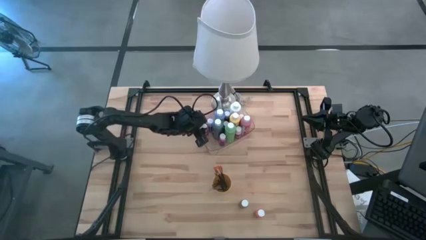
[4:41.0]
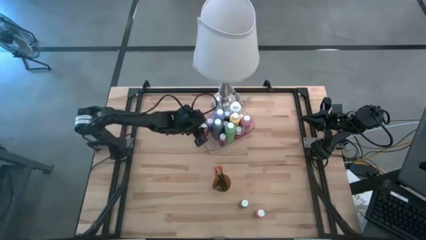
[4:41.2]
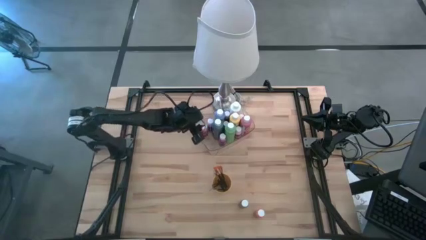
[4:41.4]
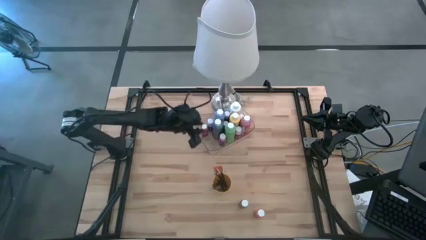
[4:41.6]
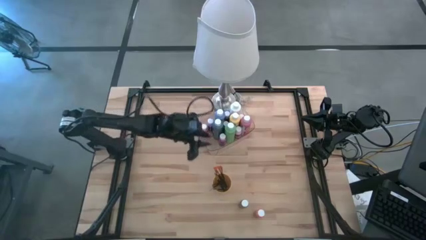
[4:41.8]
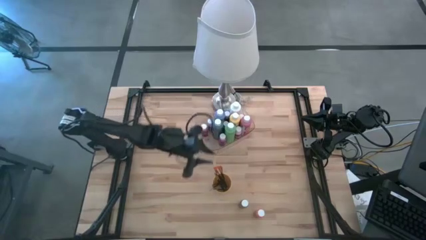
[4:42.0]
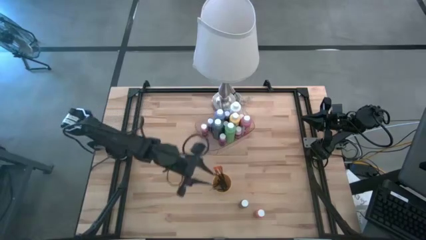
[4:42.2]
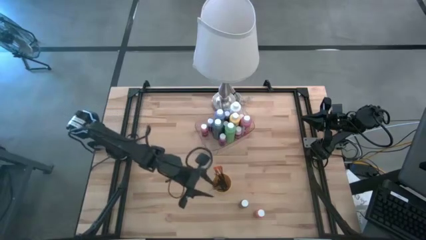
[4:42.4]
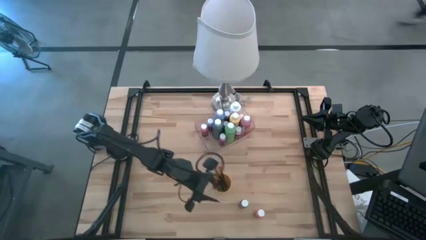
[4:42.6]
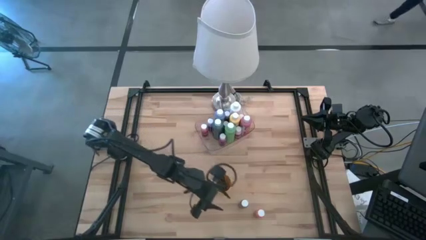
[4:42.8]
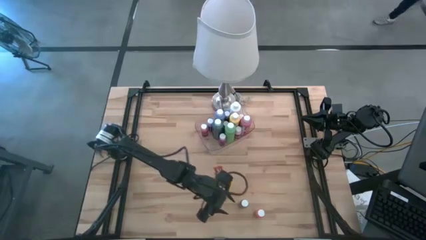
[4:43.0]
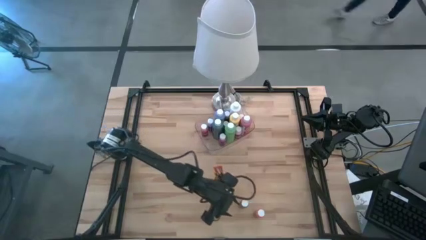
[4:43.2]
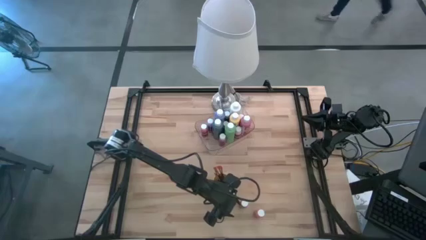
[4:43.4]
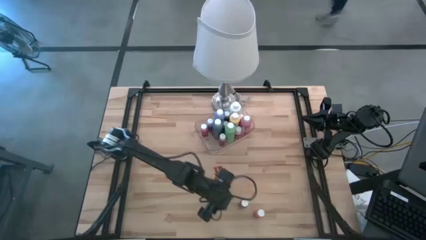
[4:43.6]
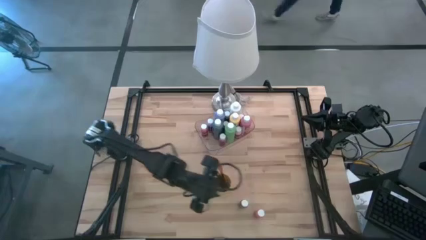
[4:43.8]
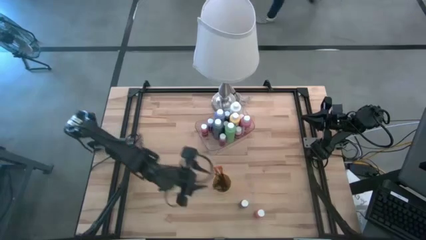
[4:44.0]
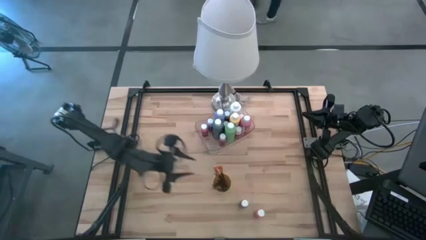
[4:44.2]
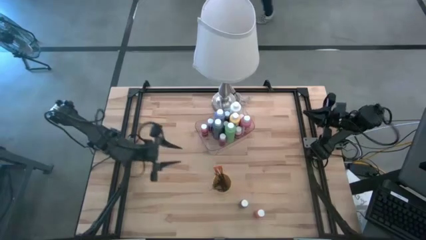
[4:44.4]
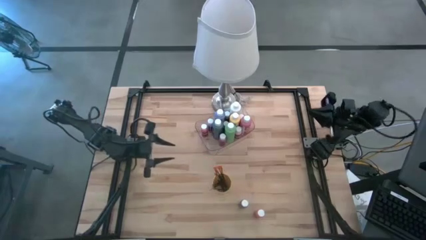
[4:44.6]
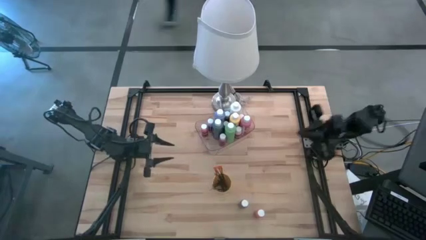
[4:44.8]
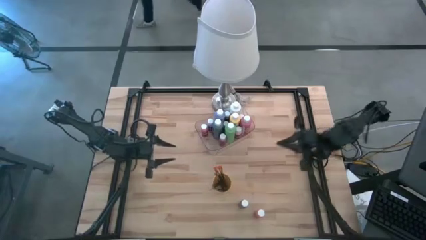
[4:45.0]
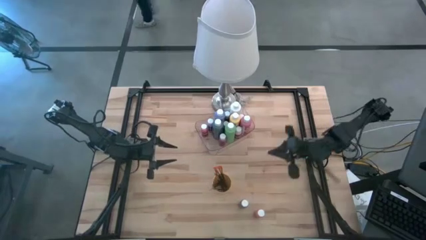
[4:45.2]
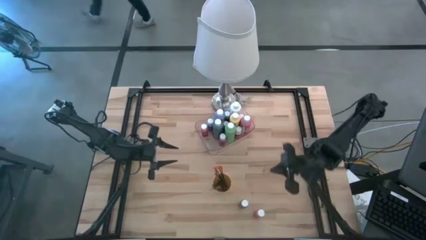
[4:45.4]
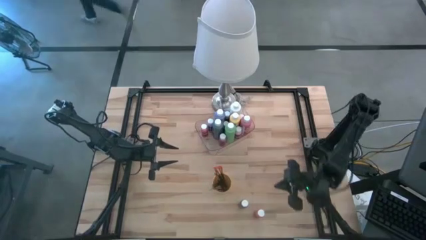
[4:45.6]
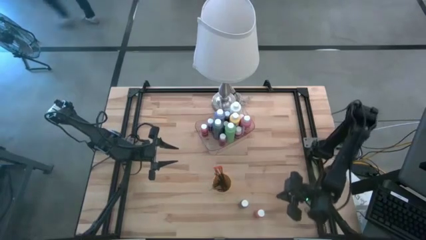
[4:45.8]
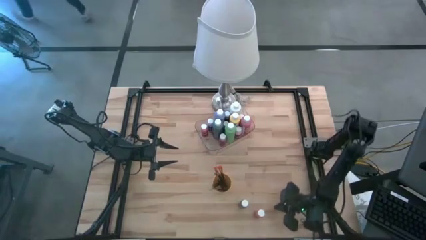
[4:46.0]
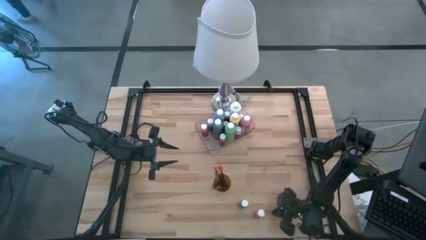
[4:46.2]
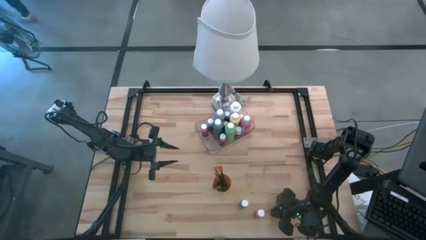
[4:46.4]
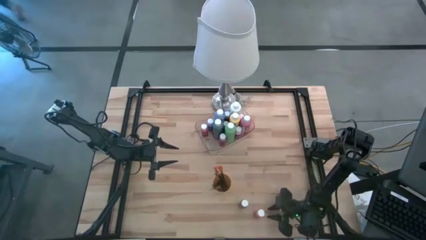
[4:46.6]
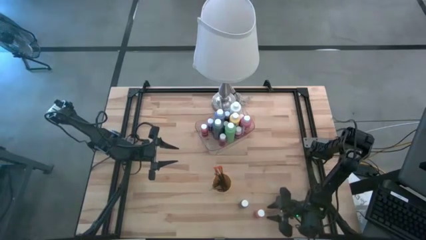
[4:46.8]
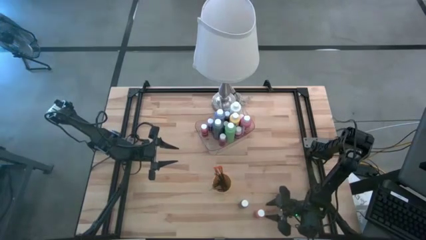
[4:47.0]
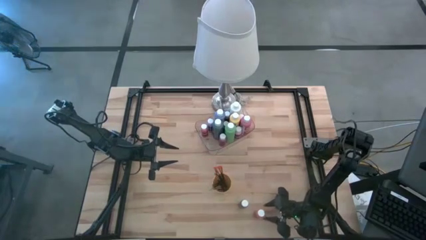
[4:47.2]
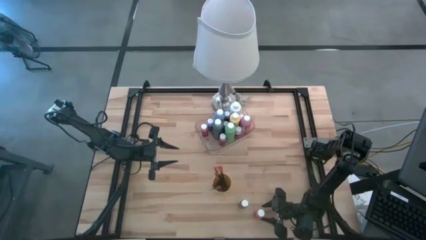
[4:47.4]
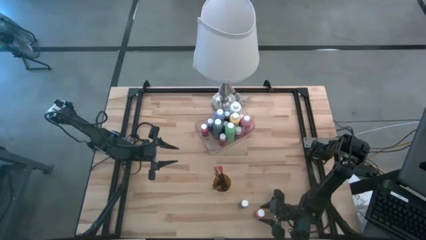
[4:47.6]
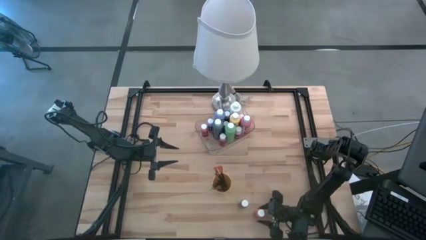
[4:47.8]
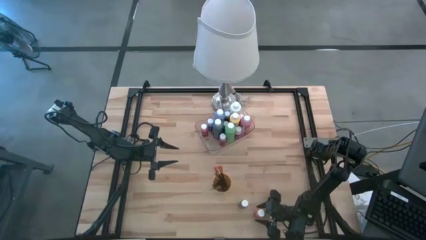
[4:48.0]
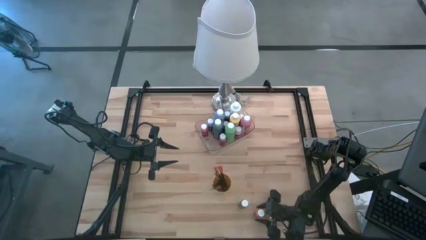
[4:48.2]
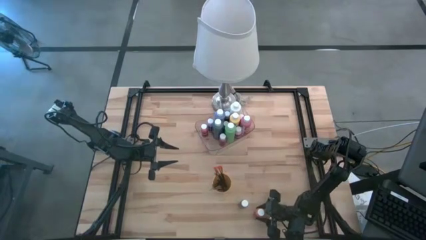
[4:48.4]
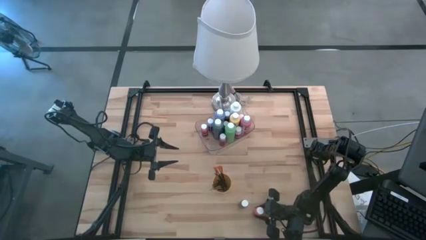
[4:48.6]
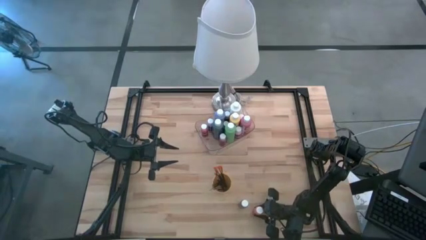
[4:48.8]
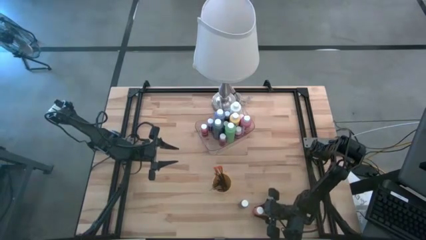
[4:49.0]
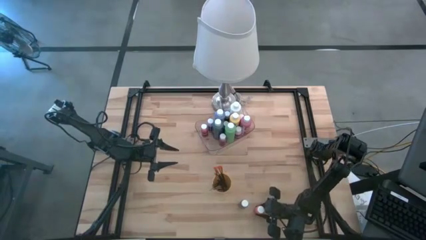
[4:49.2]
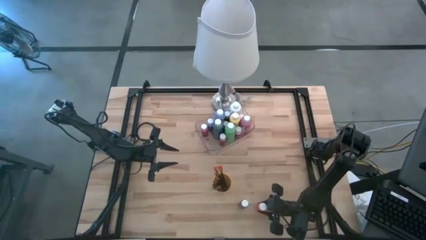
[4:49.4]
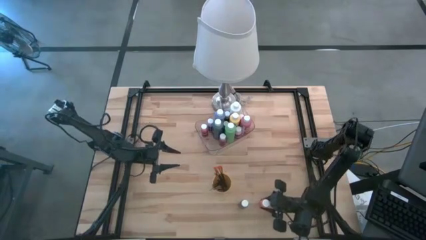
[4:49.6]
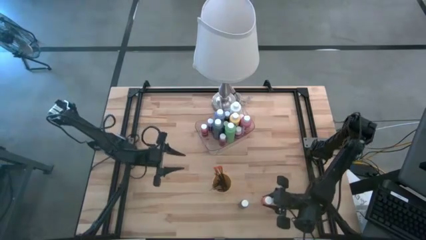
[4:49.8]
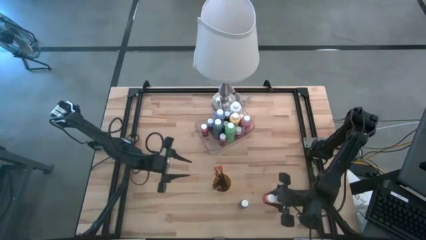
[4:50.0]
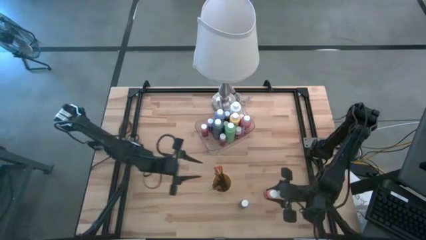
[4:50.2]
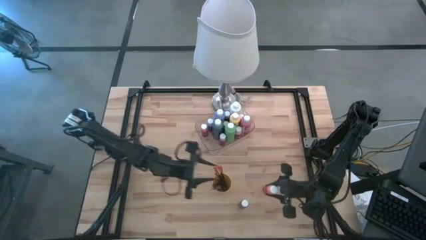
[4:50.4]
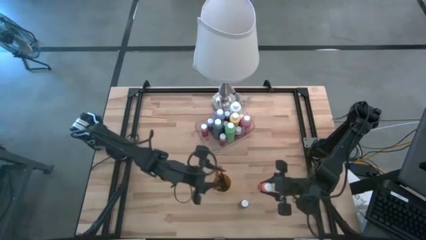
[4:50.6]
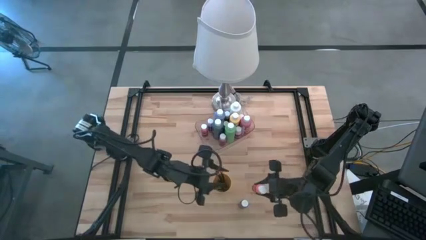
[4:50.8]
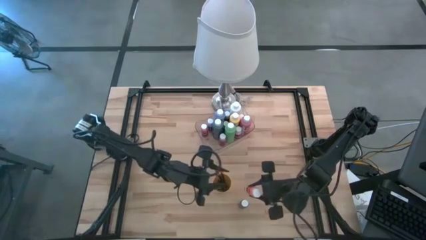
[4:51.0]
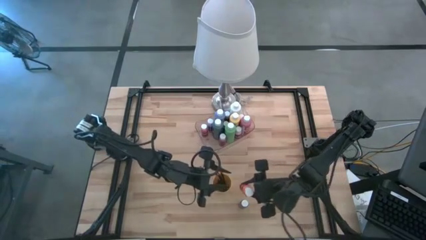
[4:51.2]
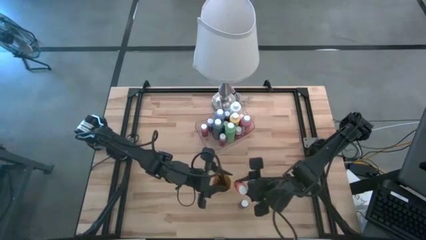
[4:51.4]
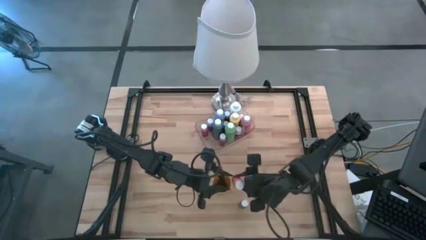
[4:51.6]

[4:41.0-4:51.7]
Task: Pick & Place Paint Supplies
Put the orange bottle into the transparent bin

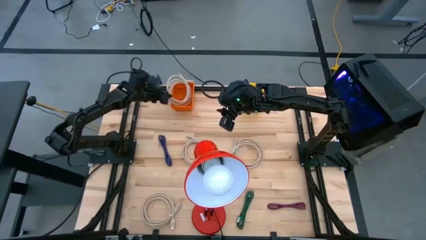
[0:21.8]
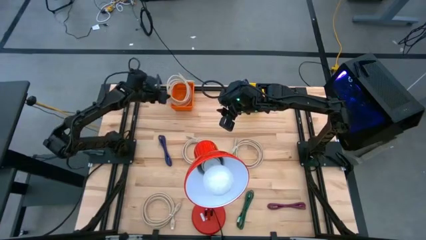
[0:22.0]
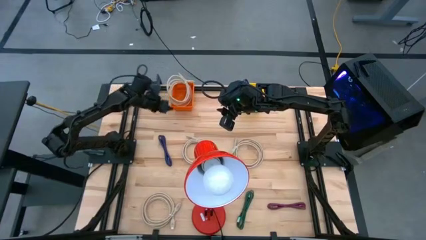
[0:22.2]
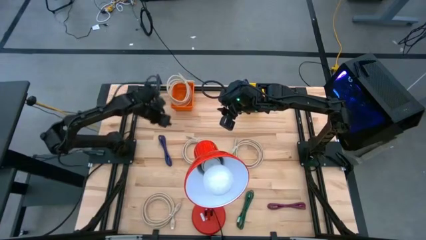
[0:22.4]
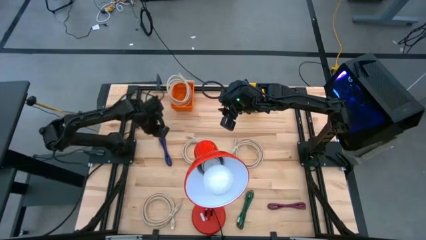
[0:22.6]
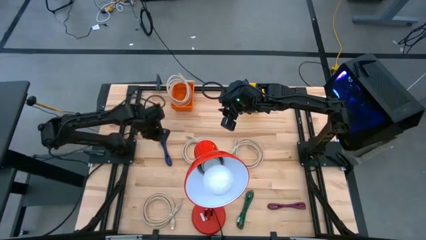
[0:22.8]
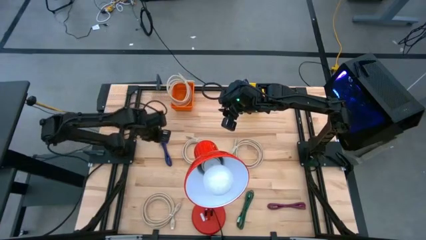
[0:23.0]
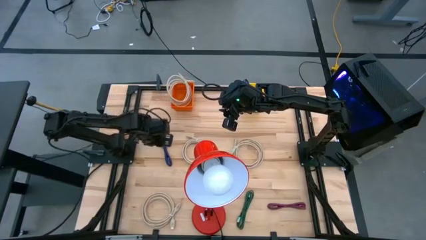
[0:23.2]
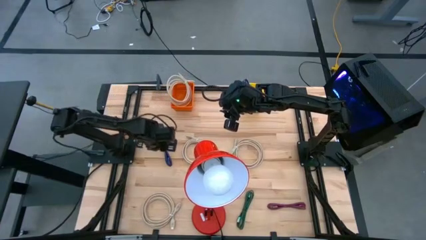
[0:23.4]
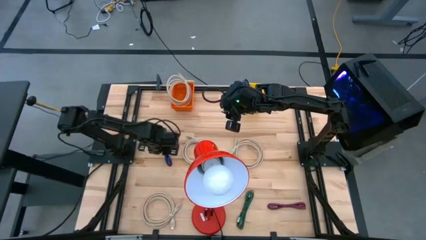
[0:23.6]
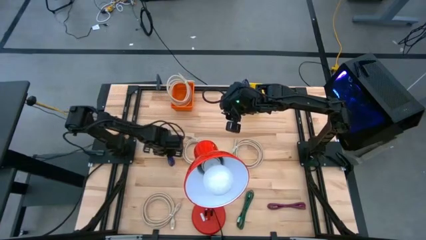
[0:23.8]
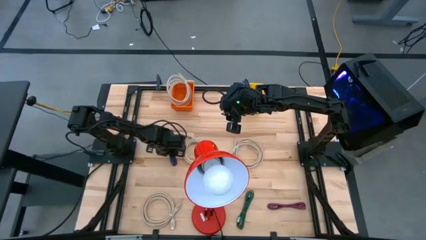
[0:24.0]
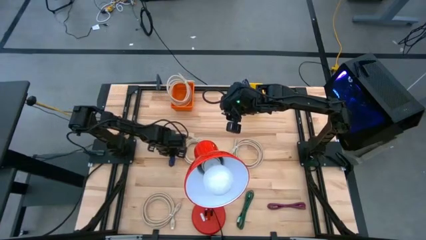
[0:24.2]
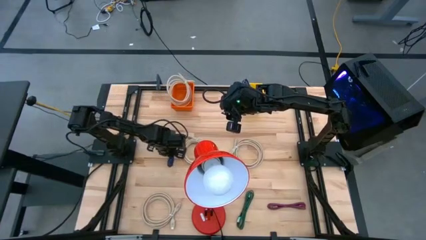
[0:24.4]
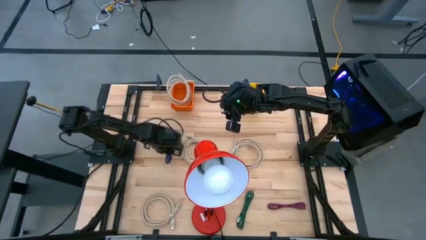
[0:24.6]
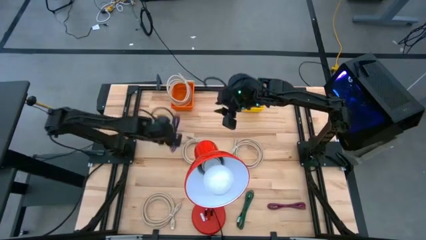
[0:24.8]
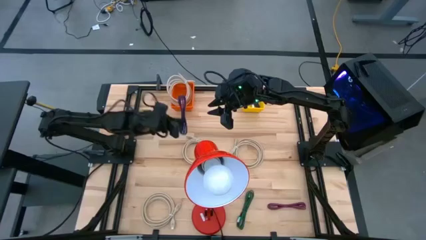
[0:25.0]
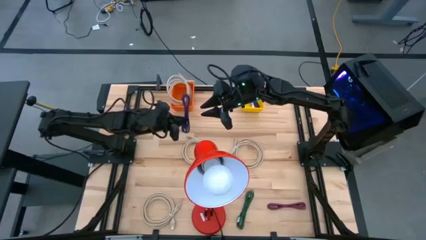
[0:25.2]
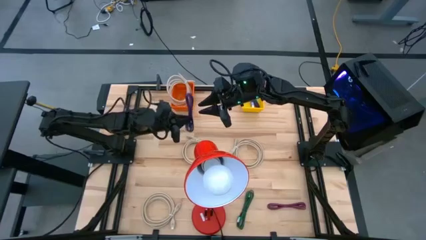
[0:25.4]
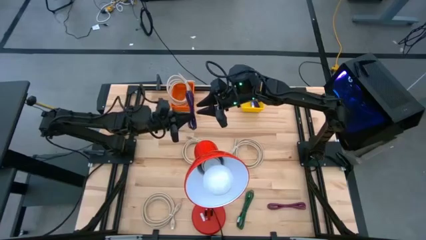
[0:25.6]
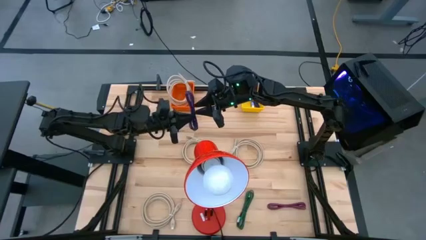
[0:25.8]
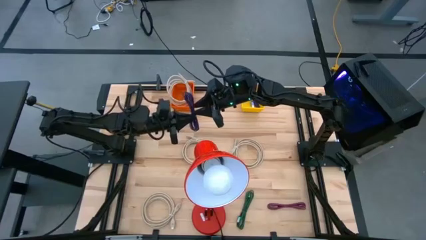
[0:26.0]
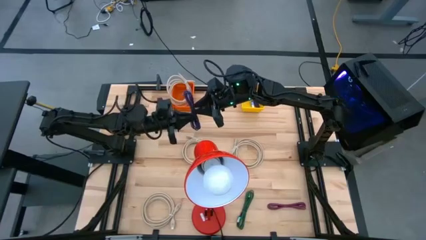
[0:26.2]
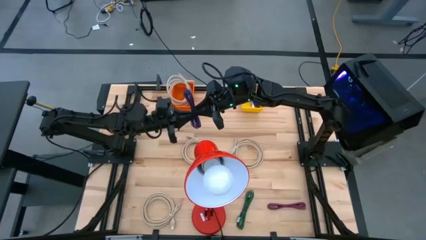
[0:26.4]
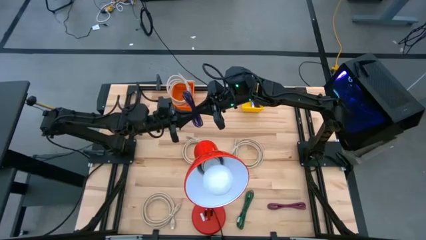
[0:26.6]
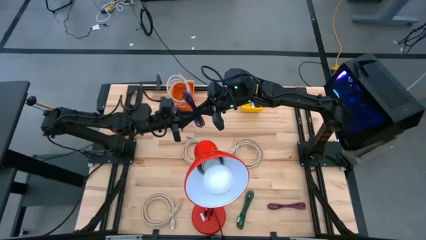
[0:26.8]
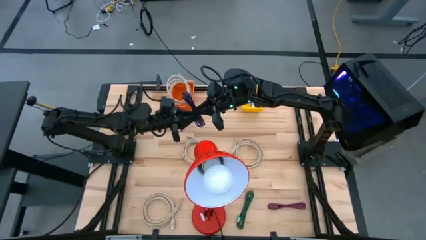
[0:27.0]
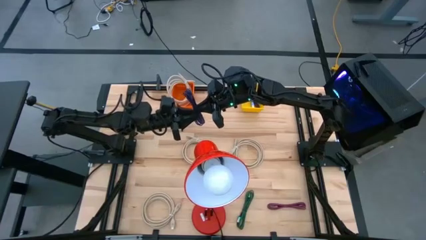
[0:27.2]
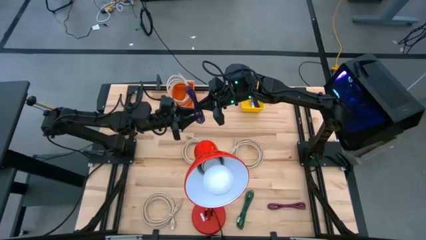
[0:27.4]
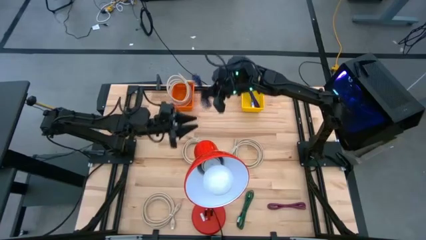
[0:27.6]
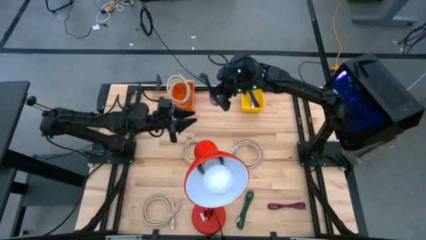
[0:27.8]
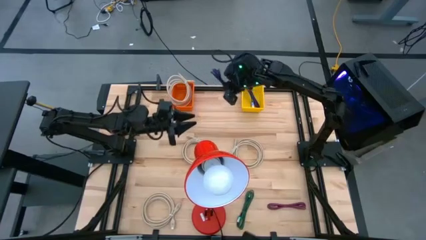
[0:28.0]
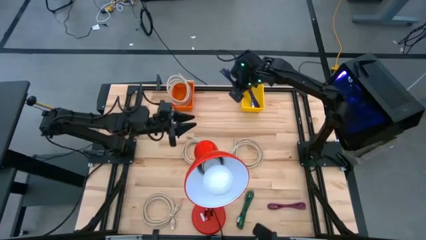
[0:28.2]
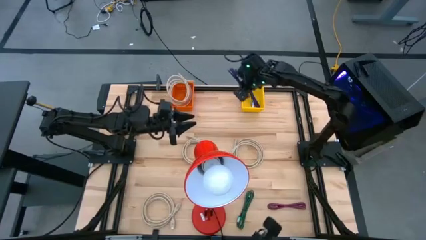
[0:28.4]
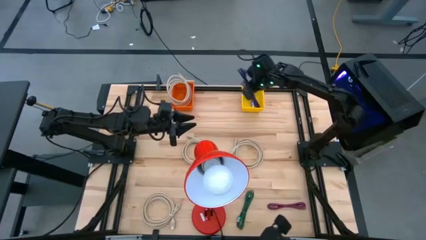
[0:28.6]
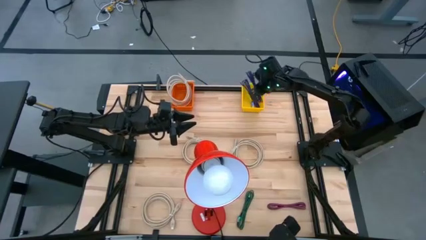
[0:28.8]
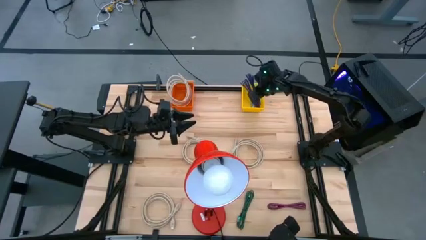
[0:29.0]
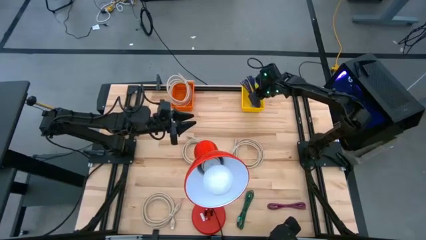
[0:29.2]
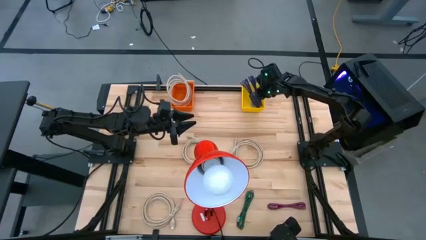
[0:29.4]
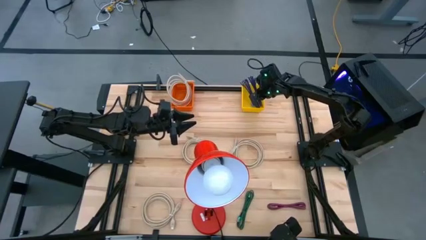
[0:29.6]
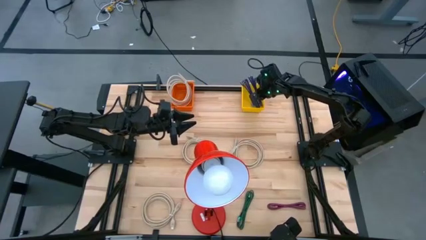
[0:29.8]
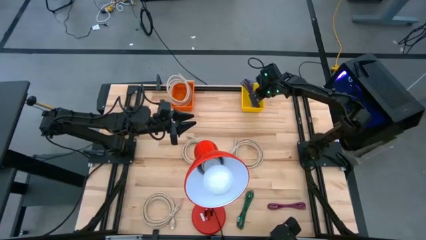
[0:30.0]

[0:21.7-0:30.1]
Task: Pick & Place USB Port
Put the blue USB cable into the yellow bin
